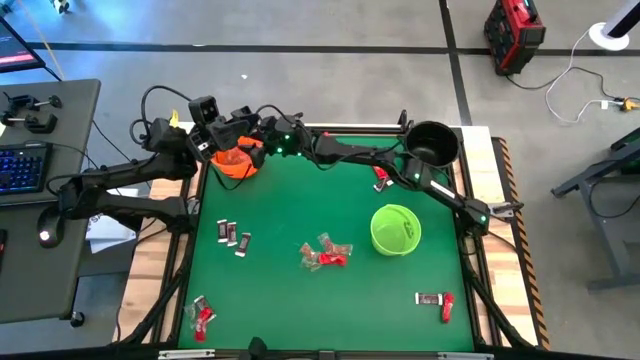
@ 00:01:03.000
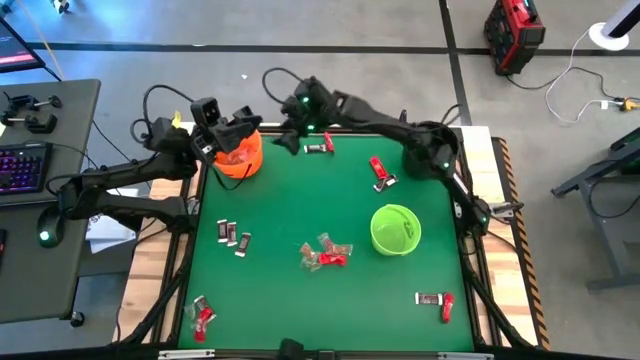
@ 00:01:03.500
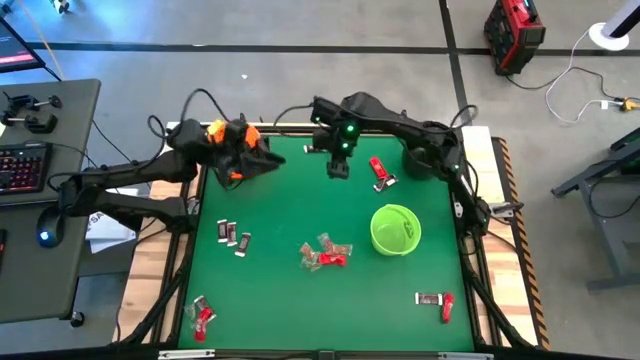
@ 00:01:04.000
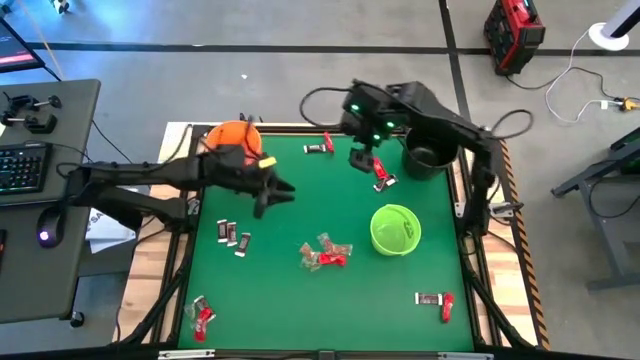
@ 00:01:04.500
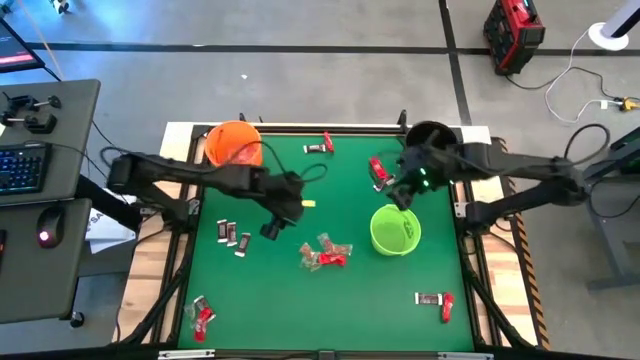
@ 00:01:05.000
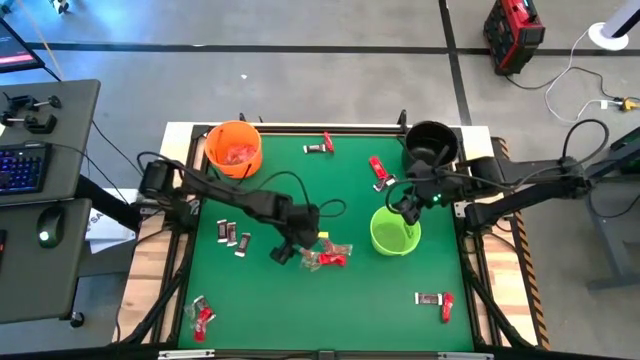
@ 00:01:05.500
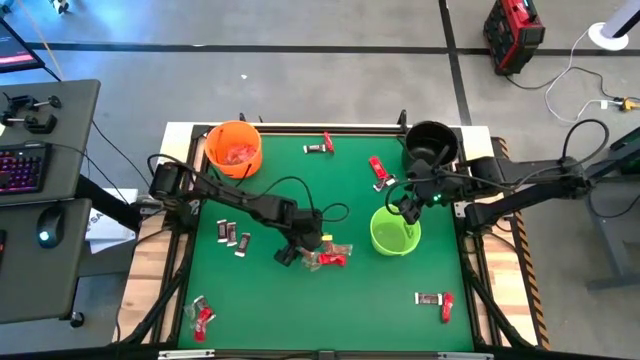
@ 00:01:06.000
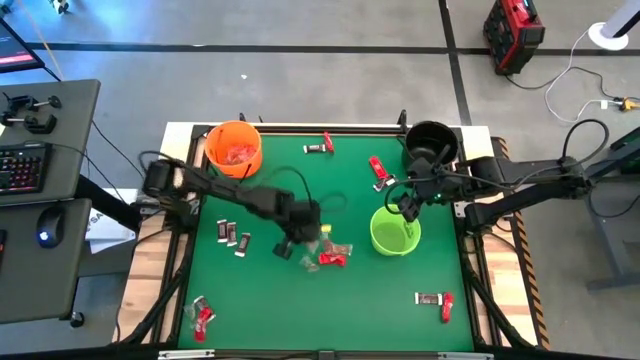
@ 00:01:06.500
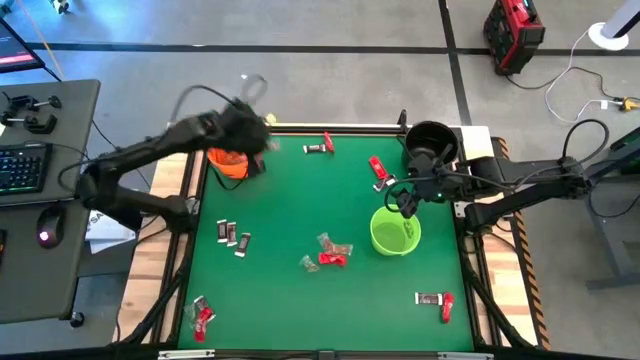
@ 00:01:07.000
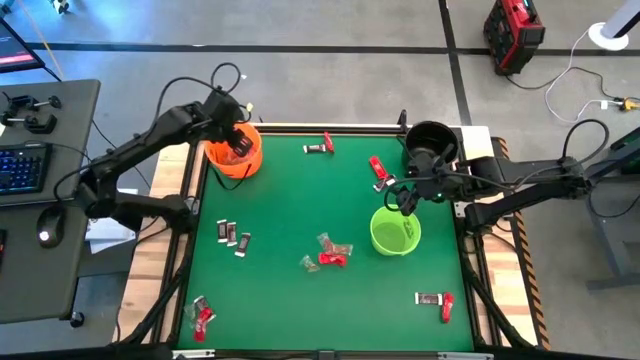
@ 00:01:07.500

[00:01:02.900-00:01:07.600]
Task: Sort candy by brand, put in halloween buckets
Put the orange gummy into the orange bucket

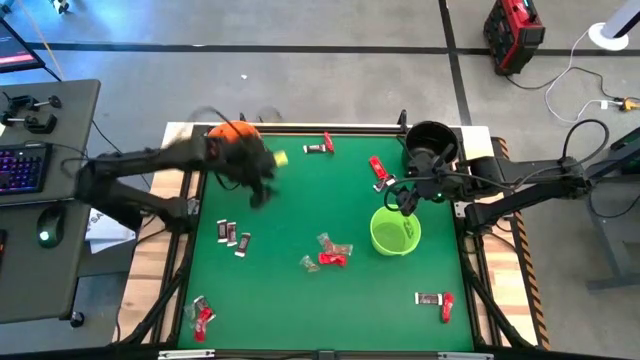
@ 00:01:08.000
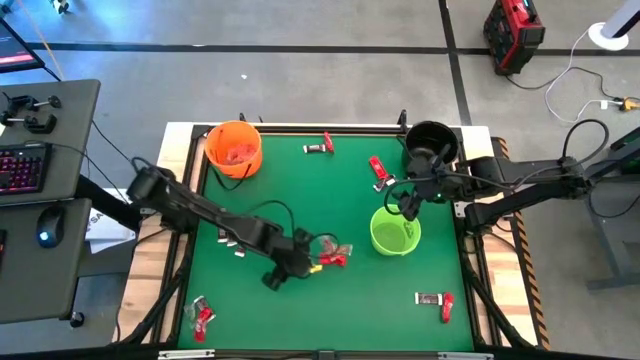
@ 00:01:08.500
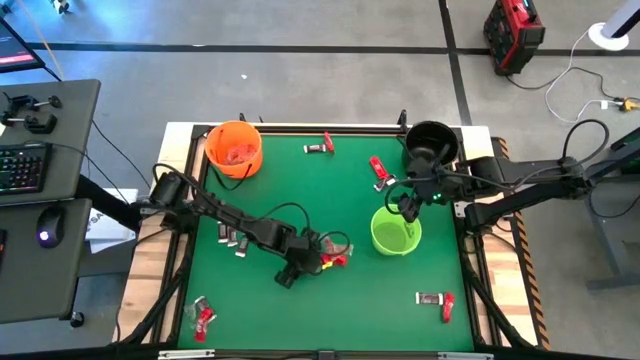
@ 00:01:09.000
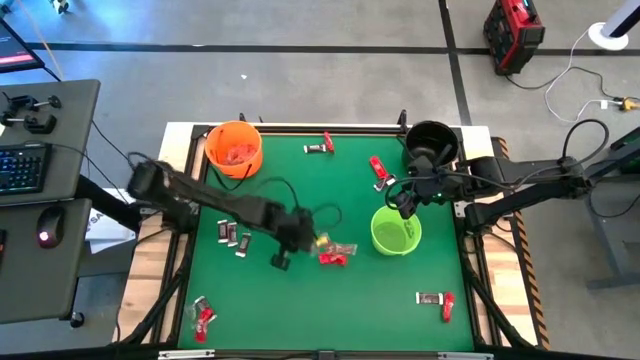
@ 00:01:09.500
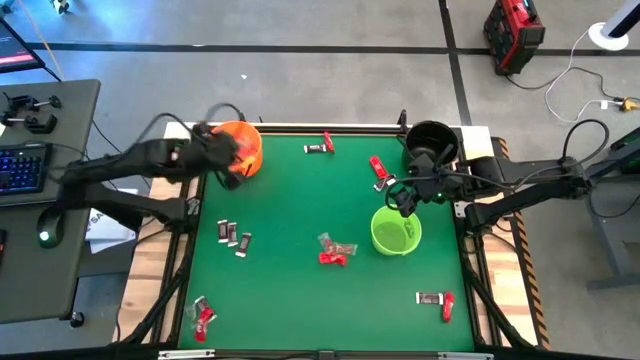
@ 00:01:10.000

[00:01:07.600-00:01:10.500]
Put the green gummy into the orange bucket

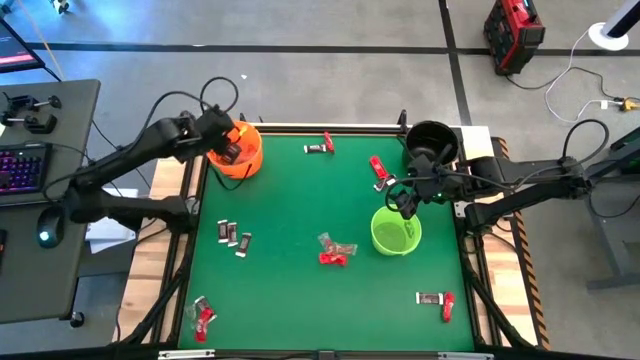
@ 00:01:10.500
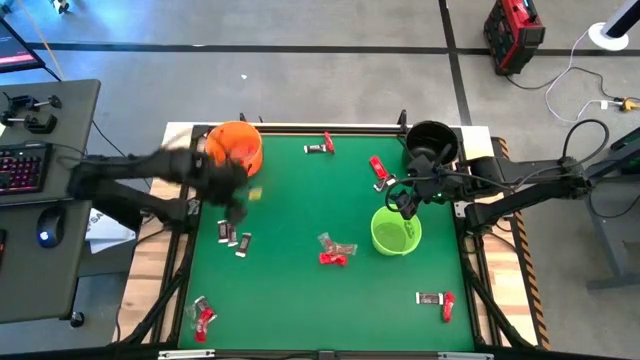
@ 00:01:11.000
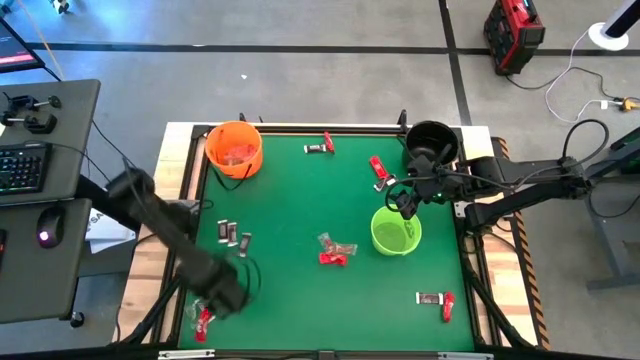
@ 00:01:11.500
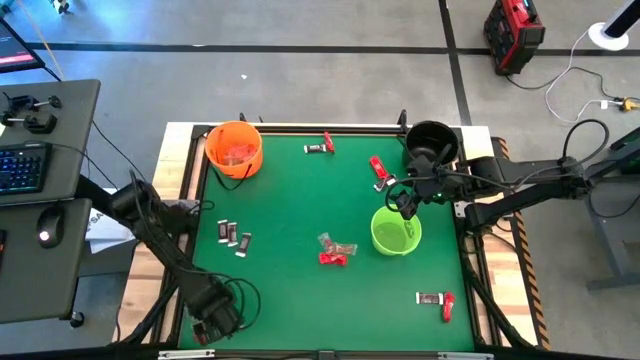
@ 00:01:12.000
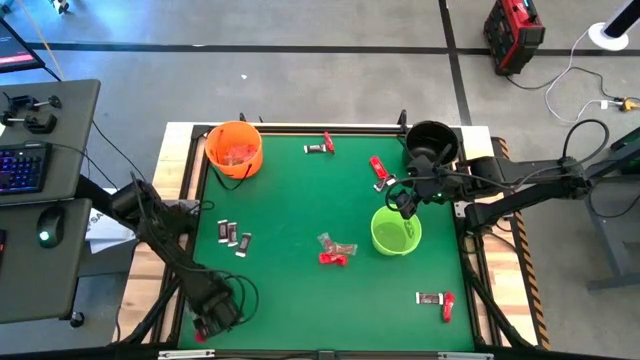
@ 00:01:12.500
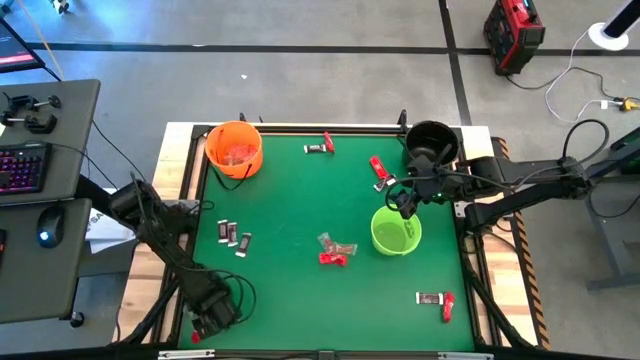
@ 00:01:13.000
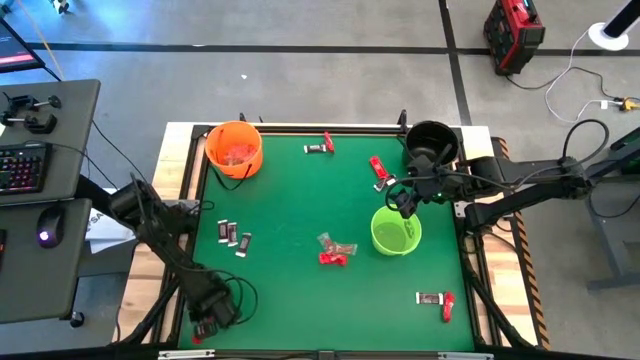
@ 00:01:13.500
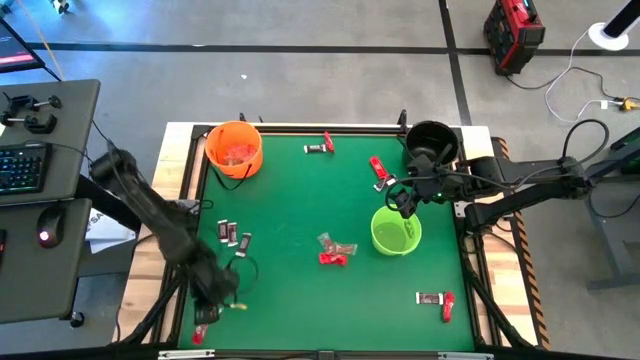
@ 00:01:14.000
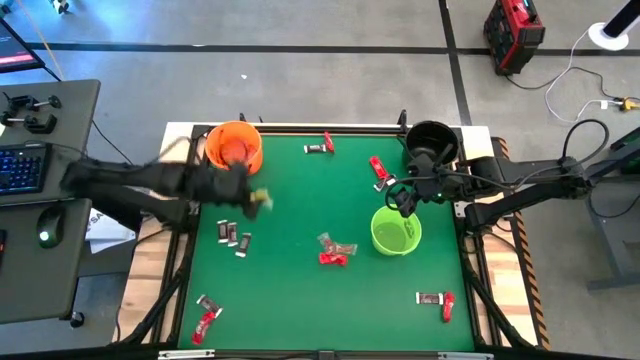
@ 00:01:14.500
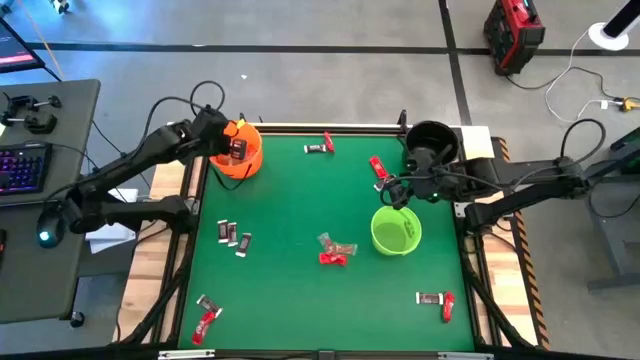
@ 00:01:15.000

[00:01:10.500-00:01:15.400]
Put the green gummy into the orange bucket

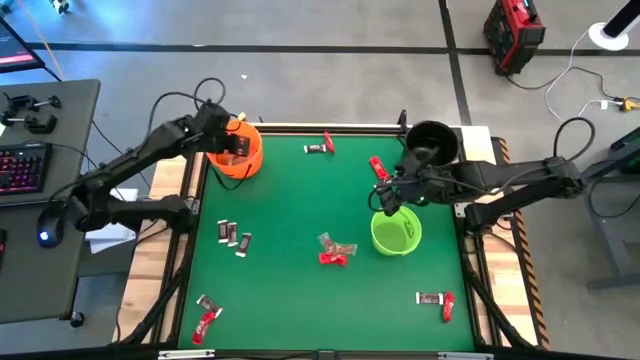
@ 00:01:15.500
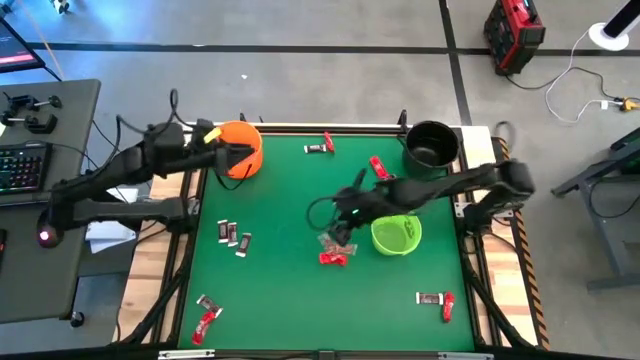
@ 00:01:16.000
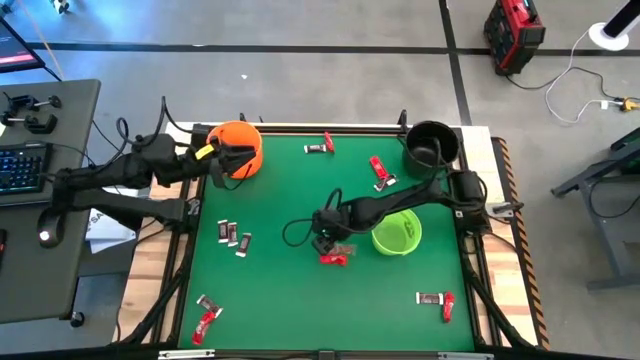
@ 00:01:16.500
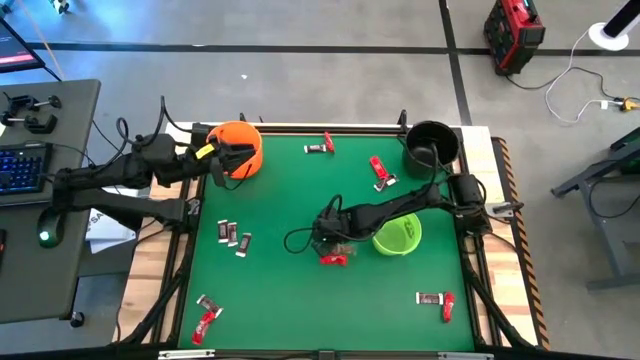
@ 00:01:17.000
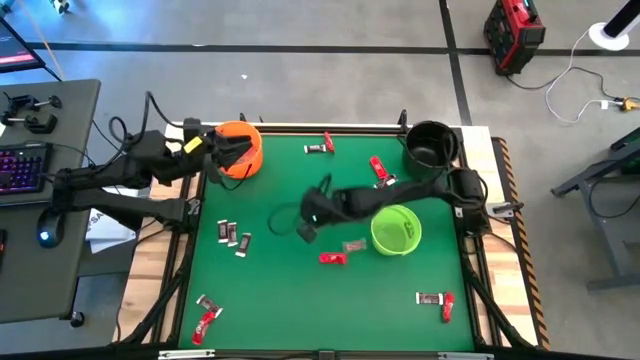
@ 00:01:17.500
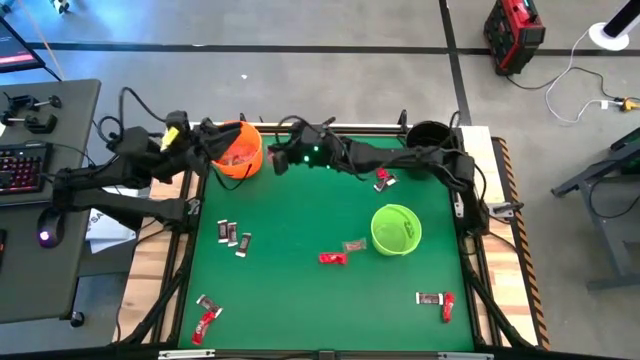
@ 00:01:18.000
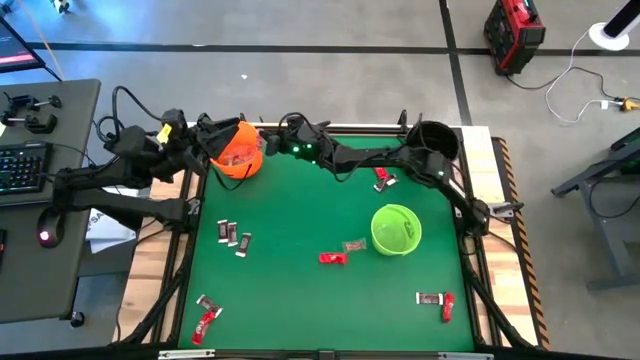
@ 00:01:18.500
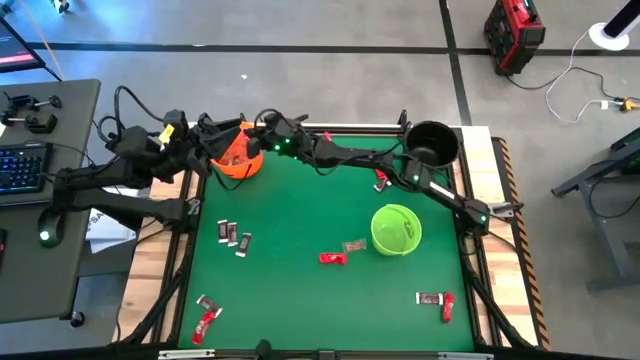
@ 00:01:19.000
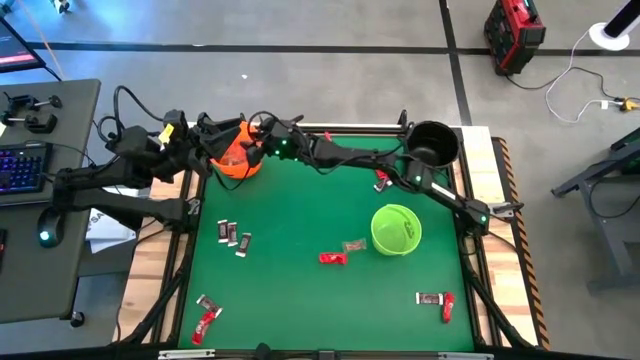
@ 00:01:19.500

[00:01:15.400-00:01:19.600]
Put the orange gummy into the orange bucket

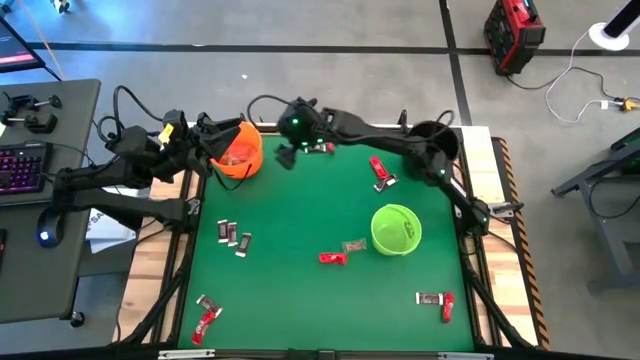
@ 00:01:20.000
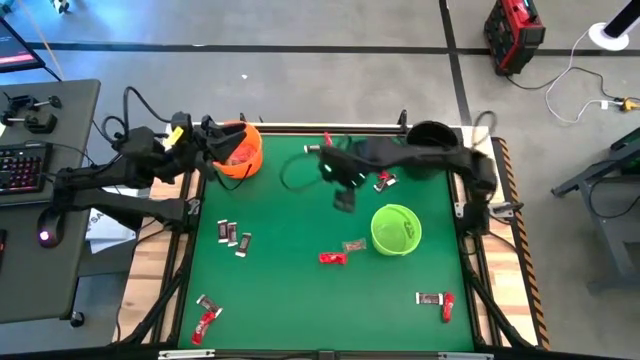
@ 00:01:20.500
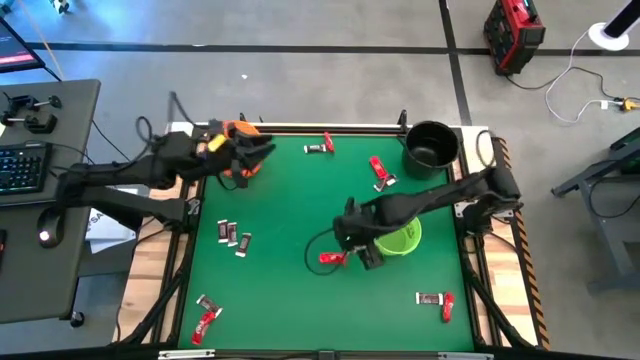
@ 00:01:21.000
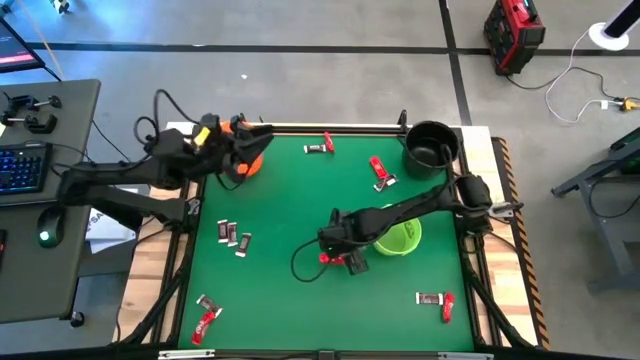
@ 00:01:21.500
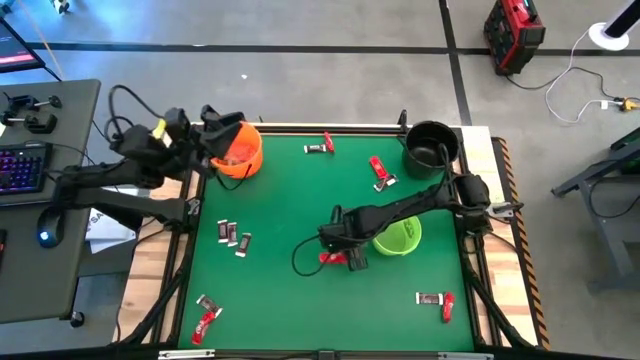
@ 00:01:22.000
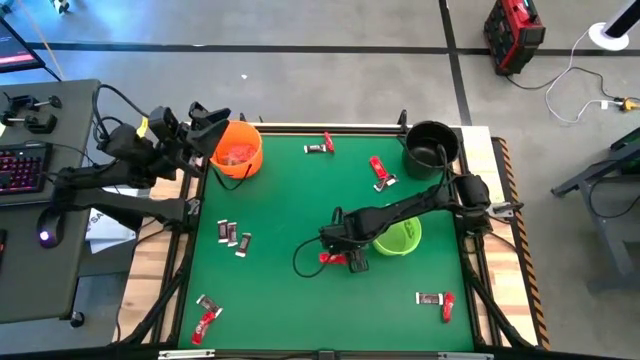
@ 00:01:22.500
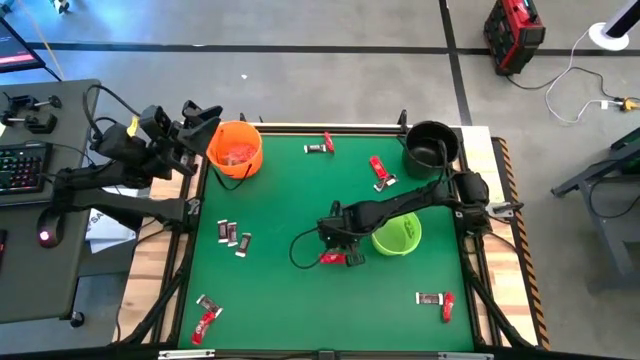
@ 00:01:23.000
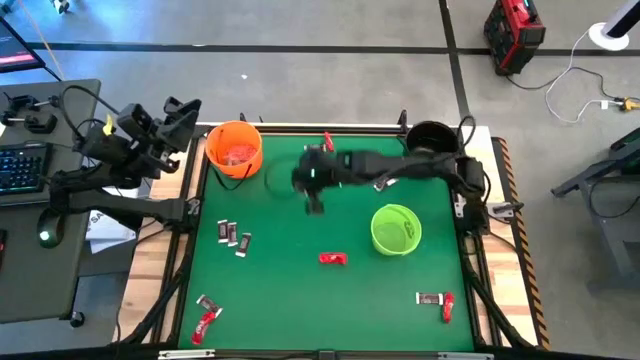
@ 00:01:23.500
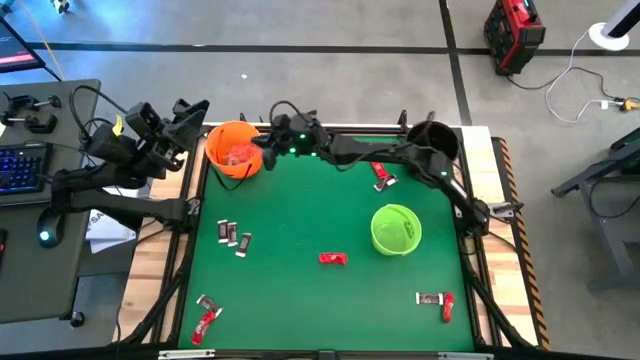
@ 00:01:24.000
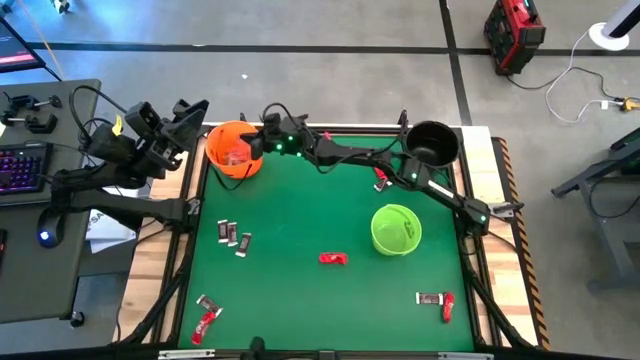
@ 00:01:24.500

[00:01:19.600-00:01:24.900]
Put the orange gummy into the orange bucket
